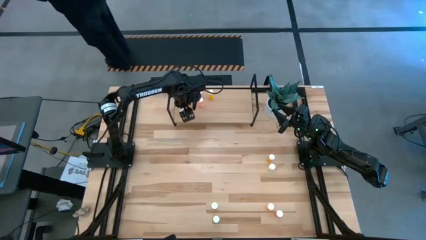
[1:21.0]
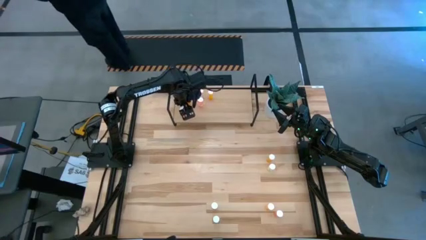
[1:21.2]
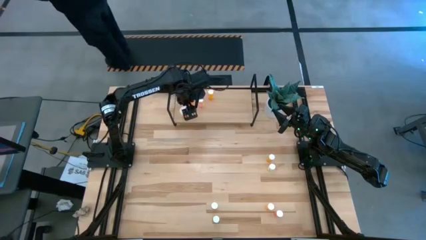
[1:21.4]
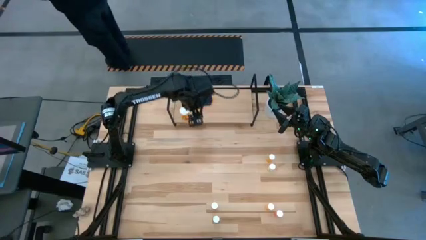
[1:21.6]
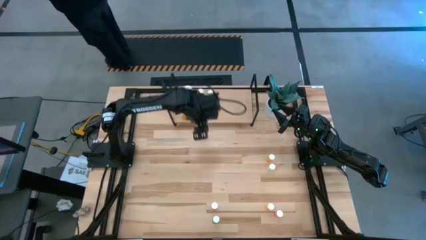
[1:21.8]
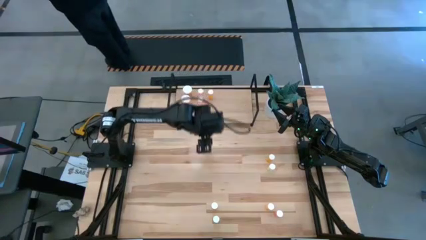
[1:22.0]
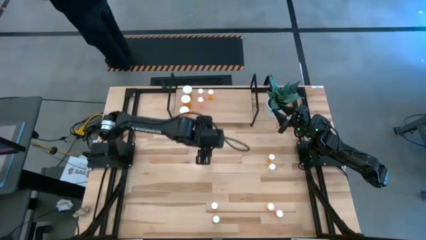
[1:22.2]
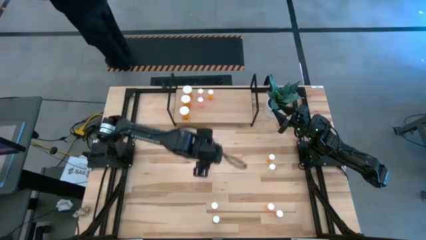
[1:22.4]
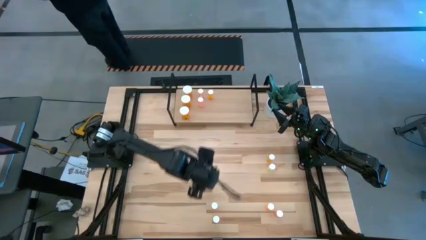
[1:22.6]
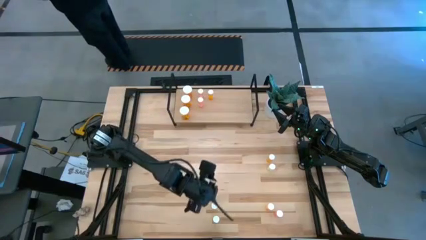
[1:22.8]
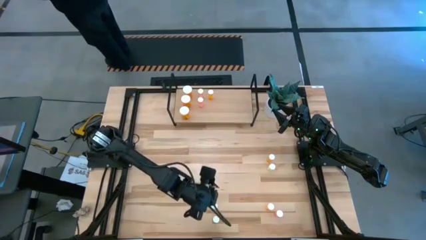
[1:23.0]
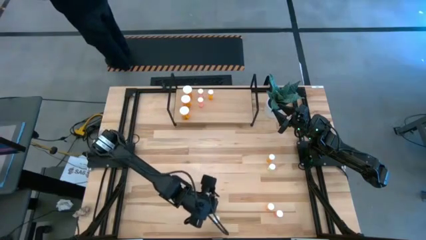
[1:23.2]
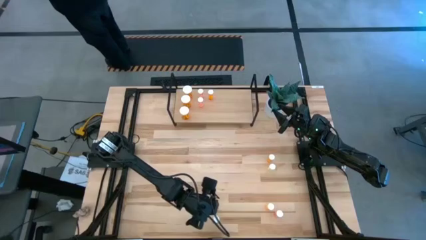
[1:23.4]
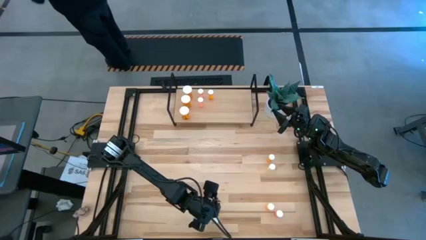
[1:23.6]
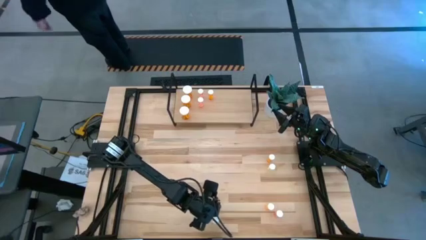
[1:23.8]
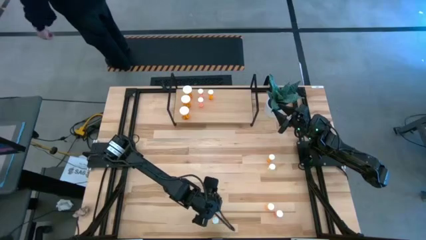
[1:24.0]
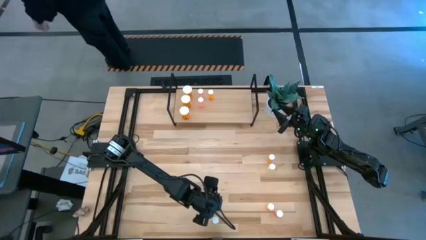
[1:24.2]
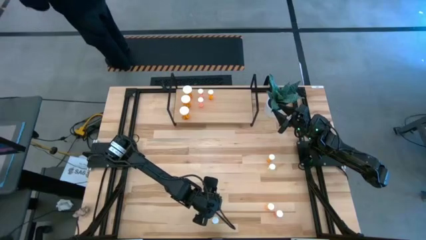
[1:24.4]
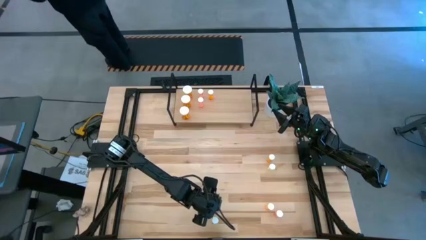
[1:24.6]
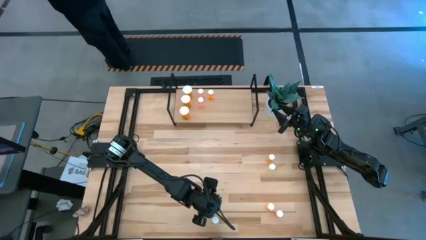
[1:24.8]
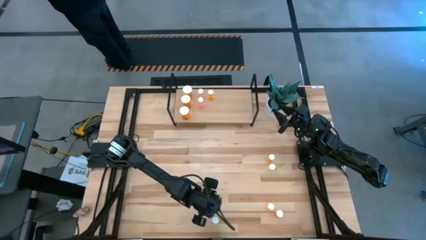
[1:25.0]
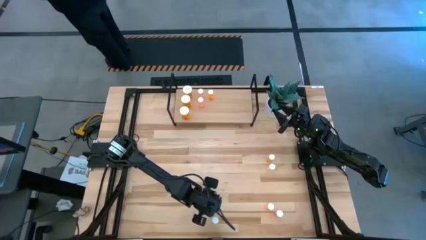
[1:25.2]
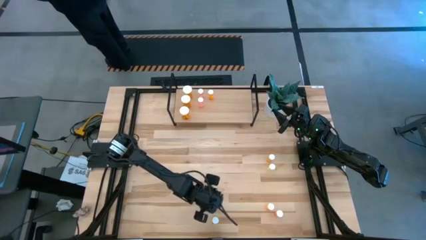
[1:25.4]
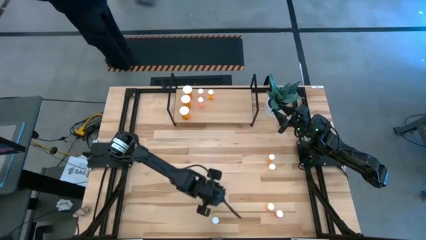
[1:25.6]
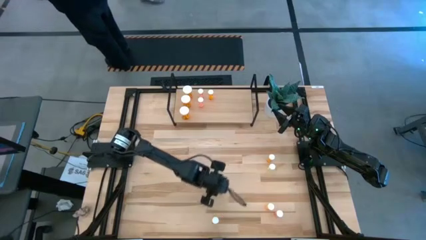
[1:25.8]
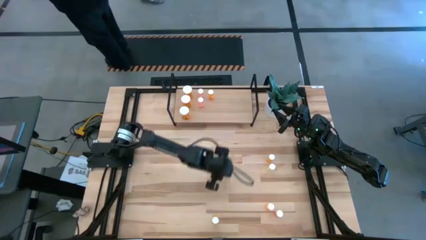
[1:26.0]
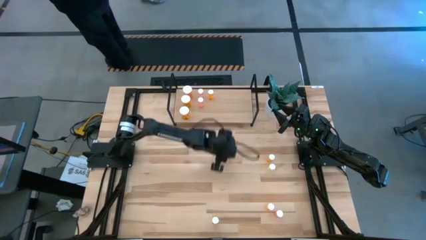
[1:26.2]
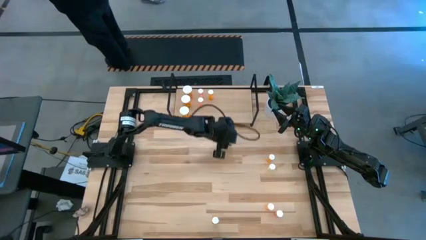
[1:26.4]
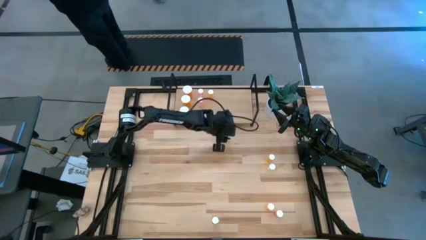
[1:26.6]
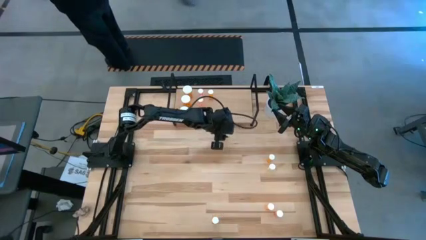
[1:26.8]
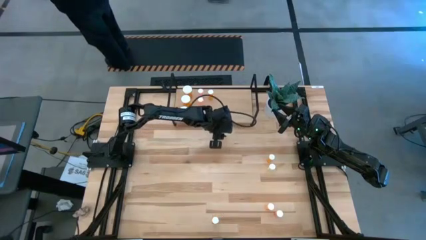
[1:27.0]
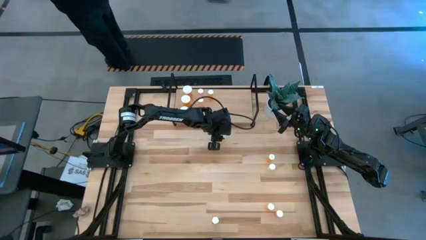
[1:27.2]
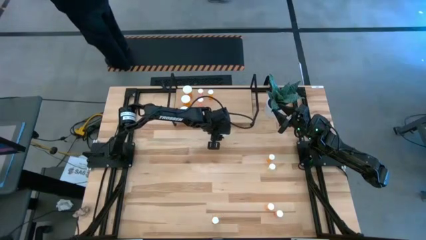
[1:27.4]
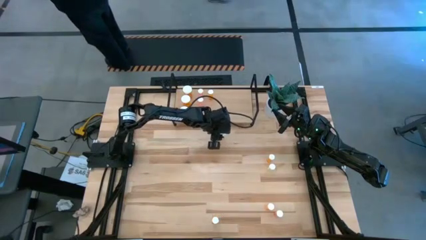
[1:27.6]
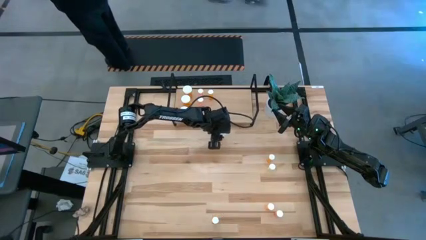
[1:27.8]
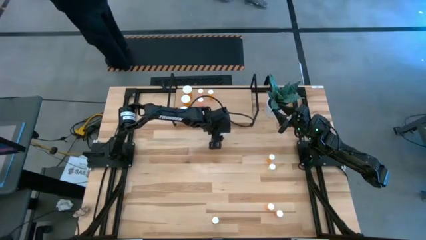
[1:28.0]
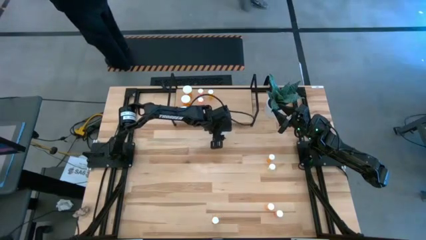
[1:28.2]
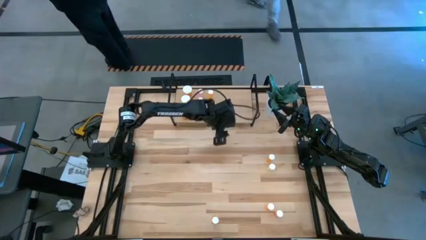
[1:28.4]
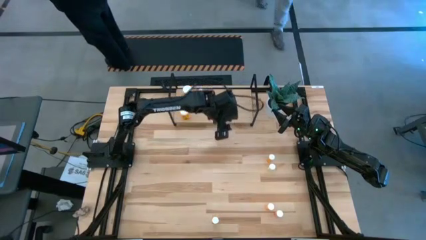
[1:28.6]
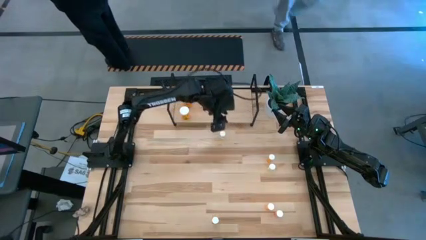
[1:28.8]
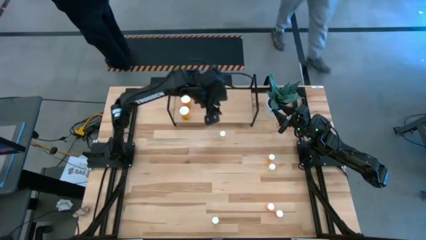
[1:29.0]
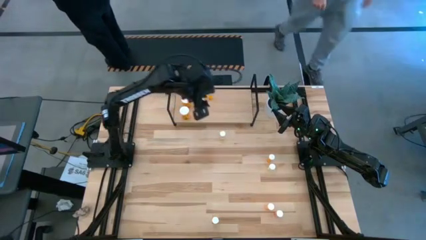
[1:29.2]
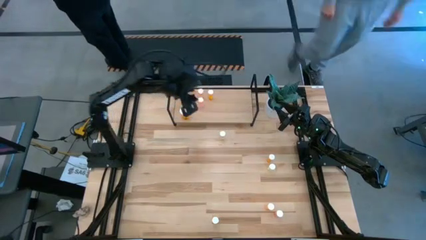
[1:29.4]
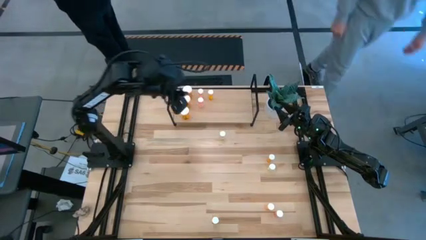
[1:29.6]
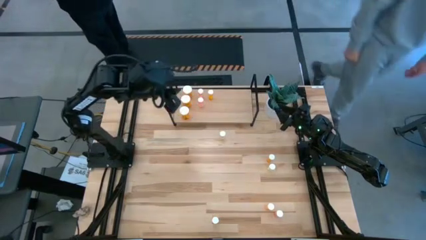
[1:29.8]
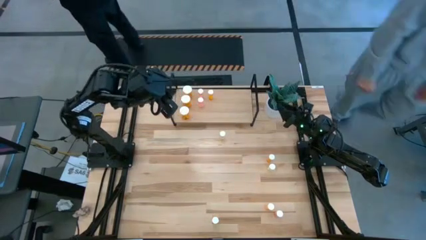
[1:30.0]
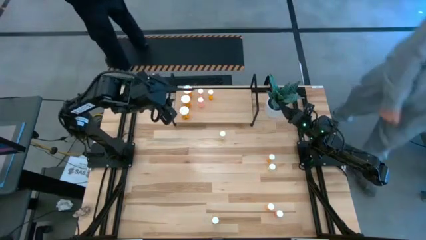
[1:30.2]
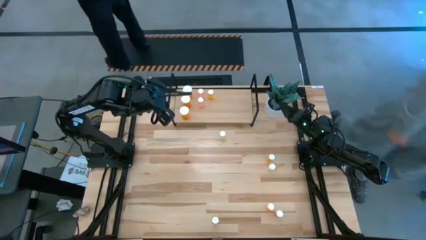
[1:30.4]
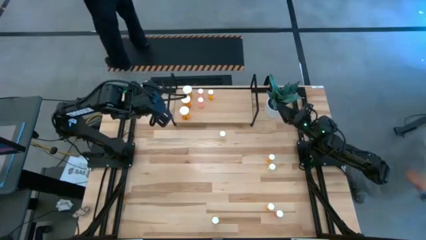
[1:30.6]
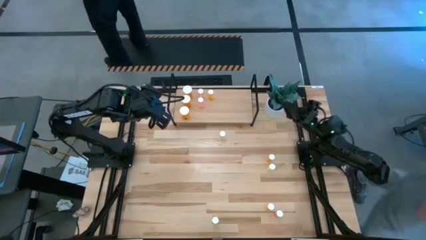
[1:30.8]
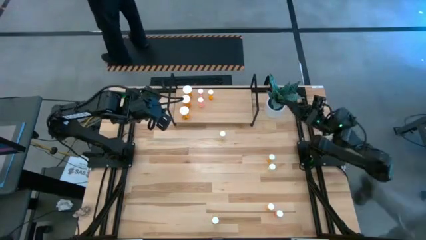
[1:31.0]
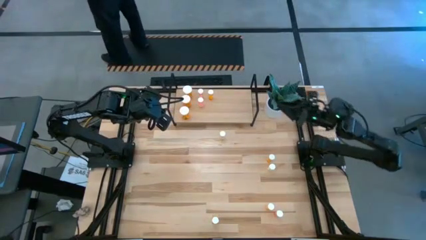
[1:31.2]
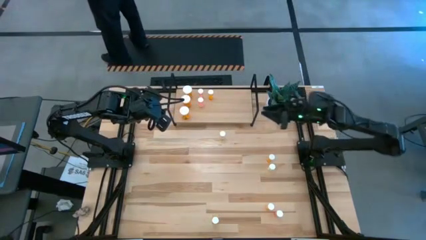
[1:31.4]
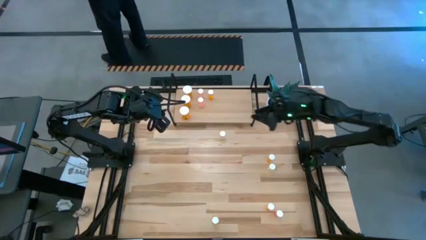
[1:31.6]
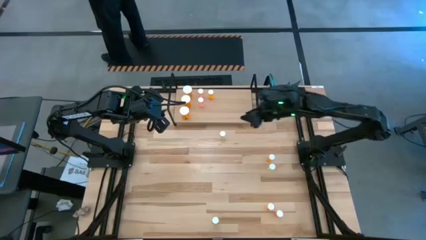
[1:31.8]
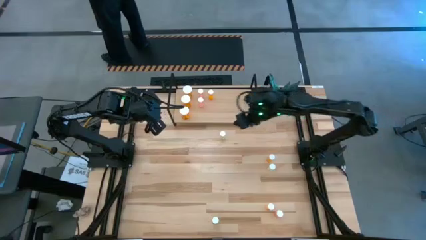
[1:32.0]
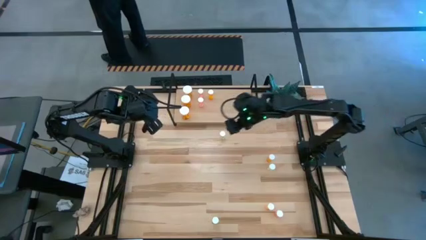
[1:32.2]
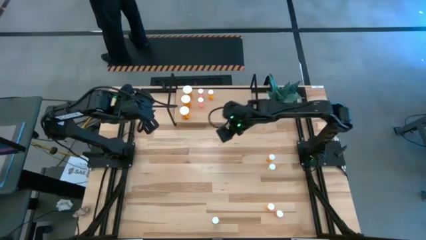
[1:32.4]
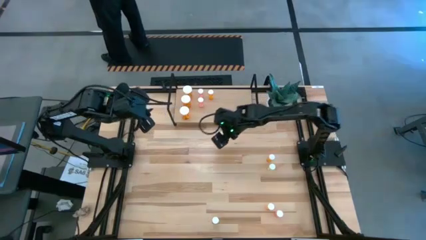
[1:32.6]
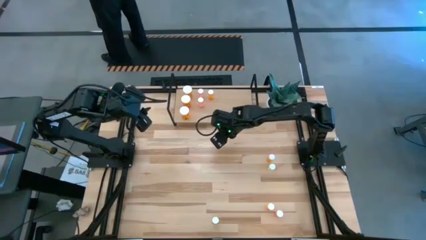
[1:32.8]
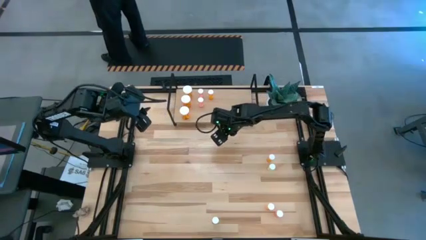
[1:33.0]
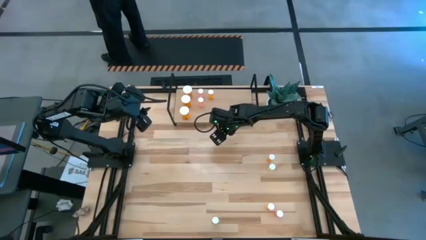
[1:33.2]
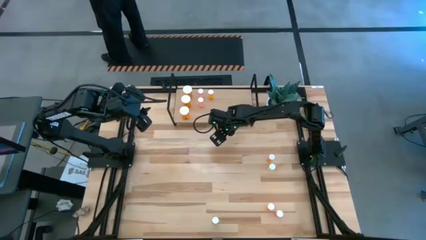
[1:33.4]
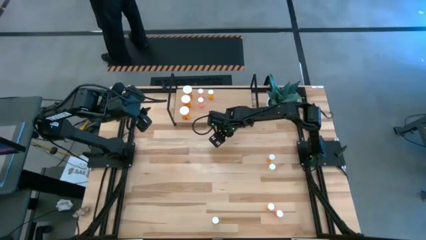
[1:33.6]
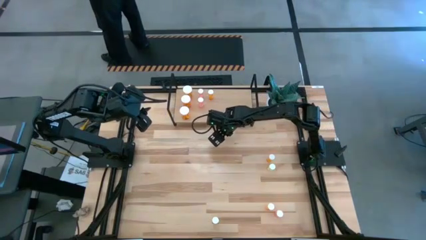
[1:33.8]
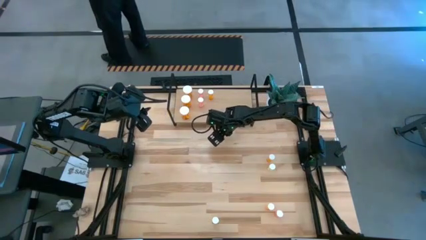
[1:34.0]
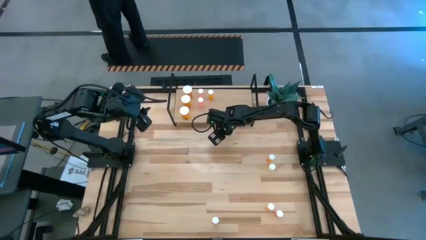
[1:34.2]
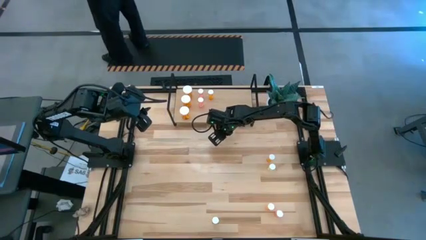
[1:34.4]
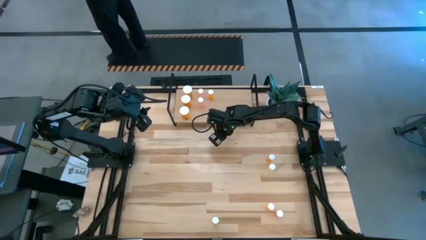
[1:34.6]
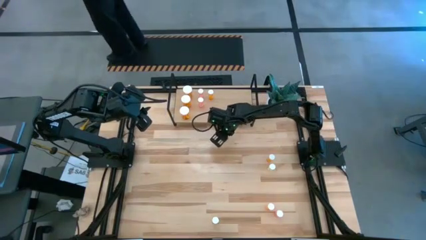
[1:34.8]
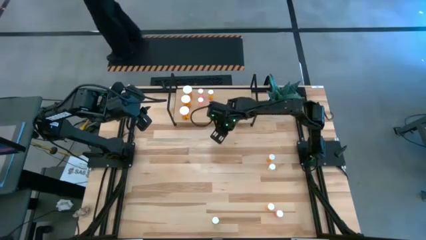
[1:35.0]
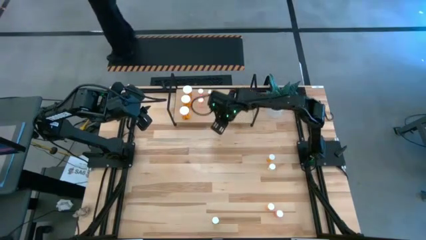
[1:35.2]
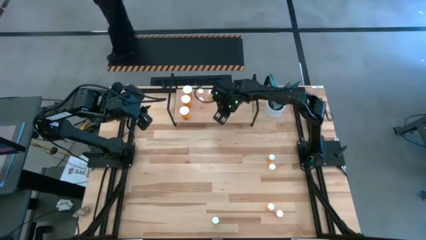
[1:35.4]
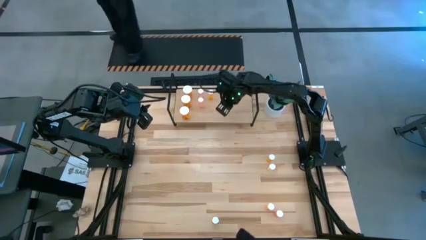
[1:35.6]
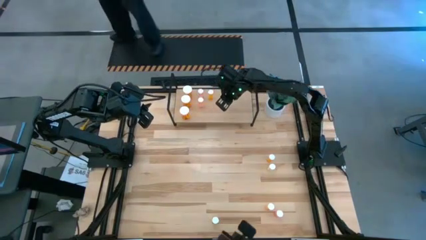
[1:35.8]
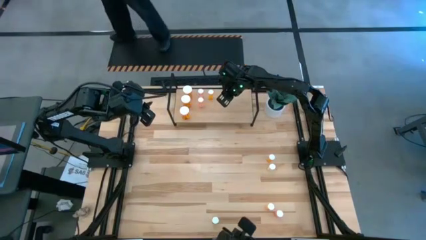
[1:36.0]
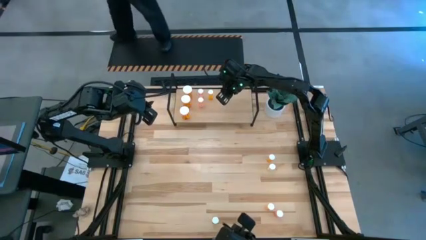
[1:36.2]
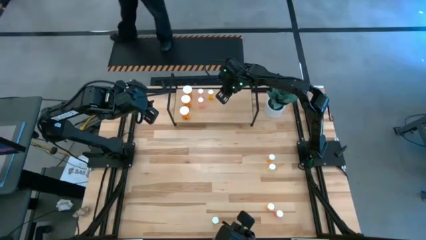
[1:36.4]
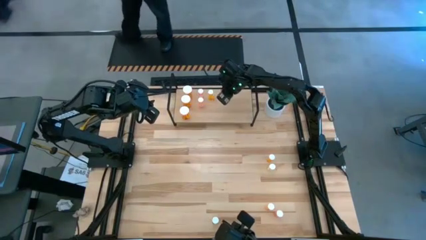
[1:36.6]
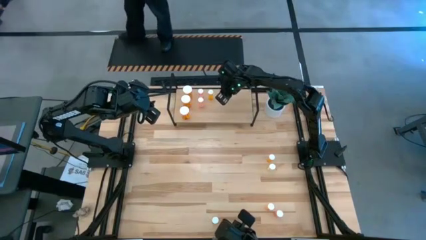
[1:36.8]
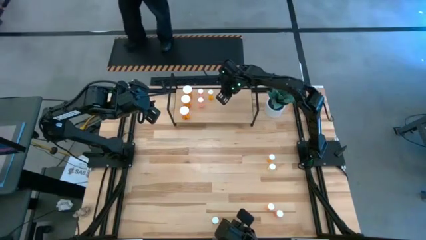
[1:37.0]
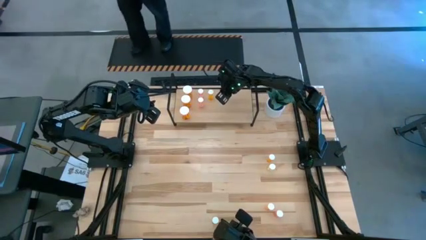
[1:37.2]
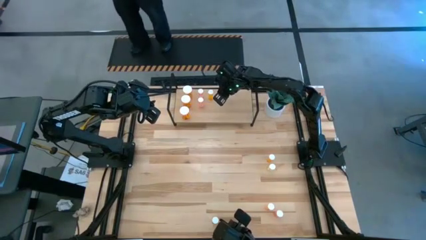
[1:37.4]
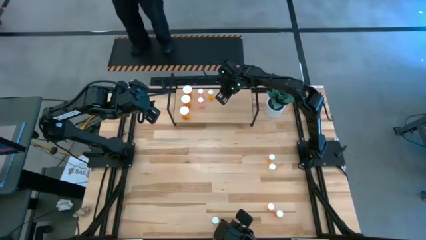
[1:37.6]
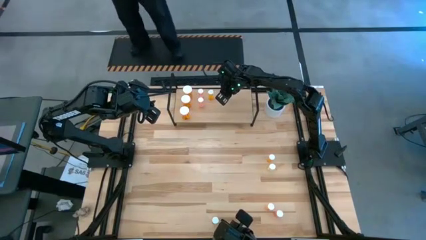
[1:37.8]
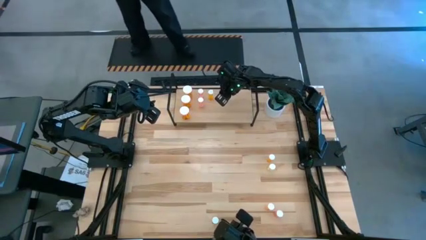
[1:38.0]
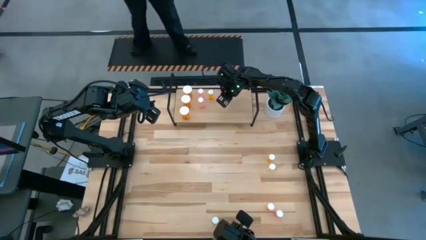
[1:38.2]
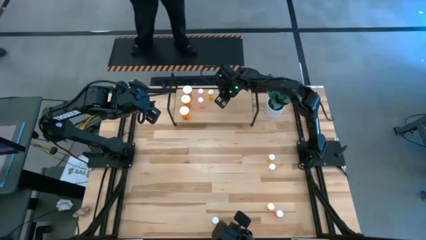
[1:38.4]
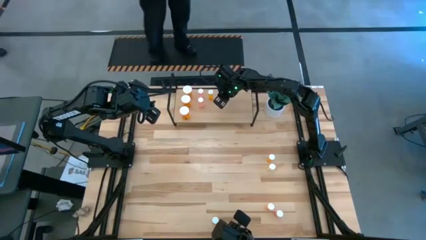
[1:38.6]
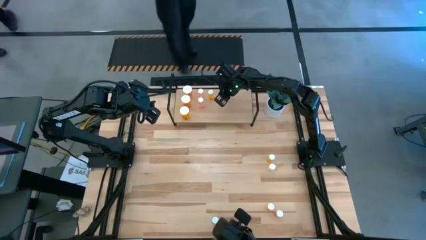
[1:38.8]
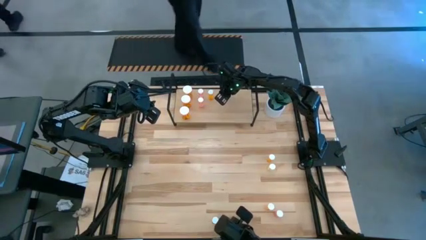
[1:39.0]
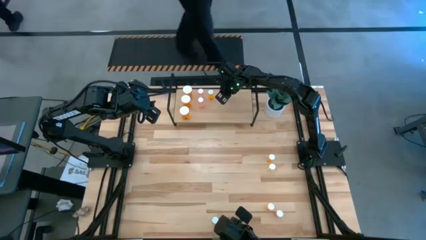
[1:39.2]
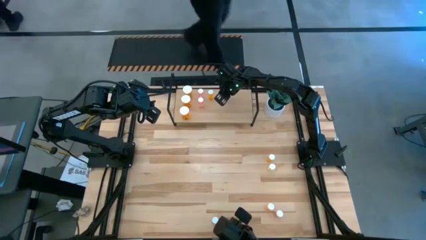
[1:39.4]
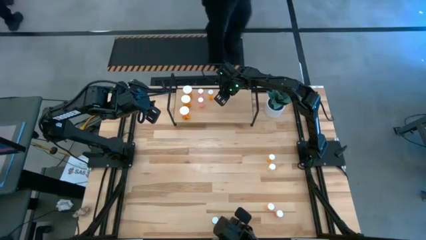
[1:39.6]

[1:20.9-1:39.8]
Task: Pick and place medicine bottles onto shelf by color
Put the middle yellow pill bottle on the shelf
